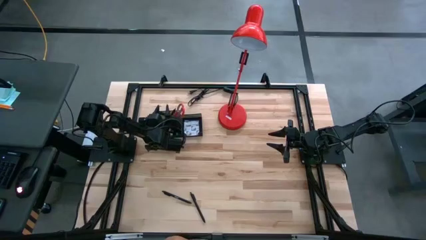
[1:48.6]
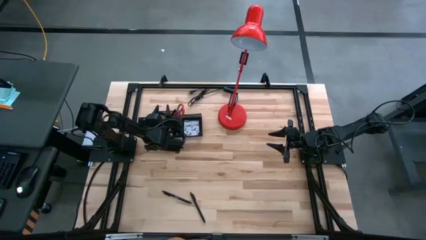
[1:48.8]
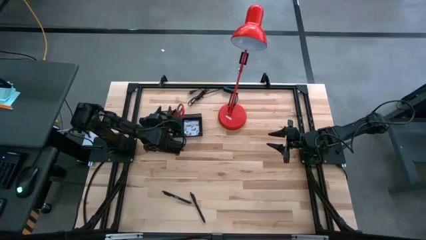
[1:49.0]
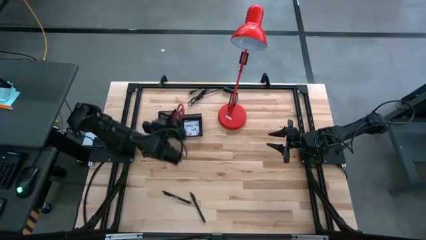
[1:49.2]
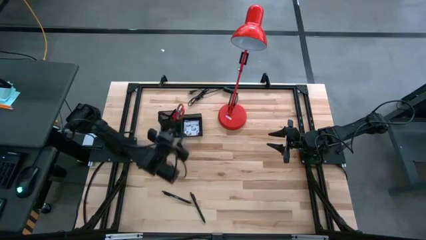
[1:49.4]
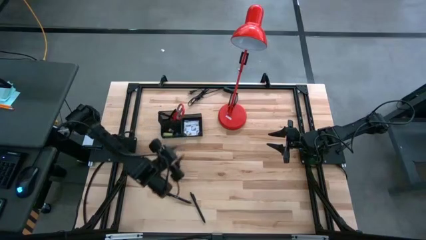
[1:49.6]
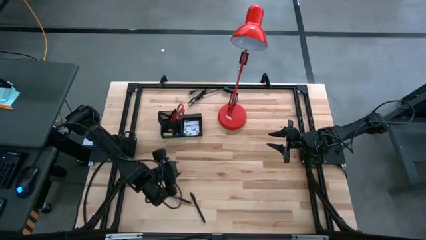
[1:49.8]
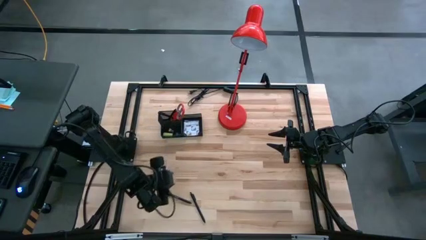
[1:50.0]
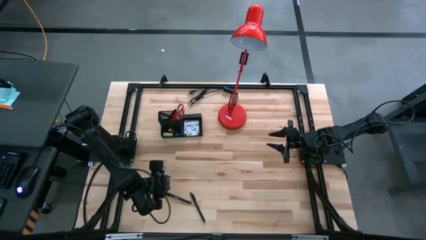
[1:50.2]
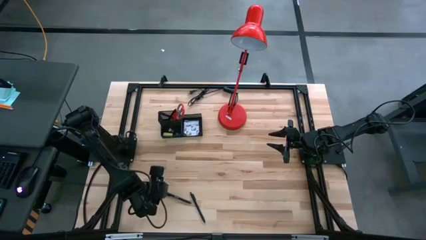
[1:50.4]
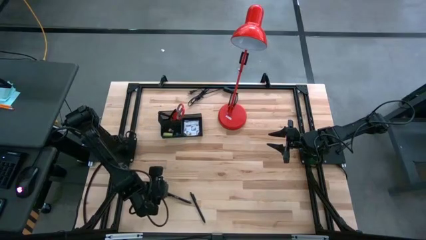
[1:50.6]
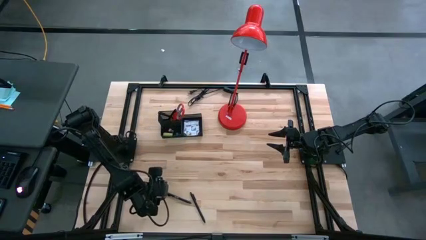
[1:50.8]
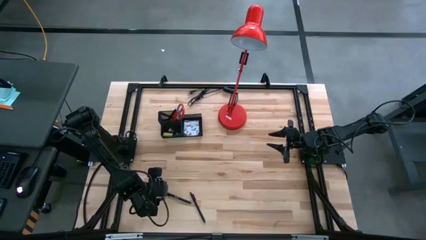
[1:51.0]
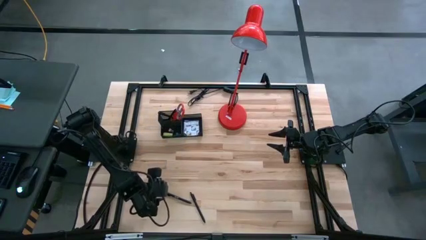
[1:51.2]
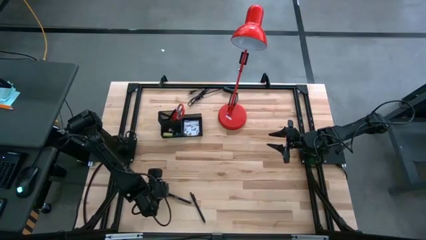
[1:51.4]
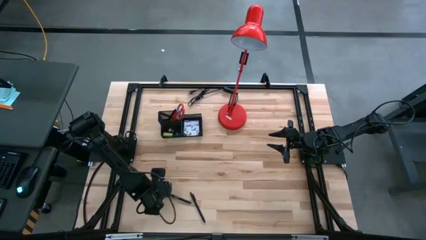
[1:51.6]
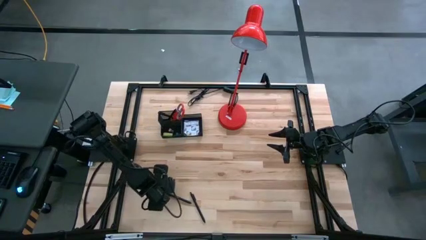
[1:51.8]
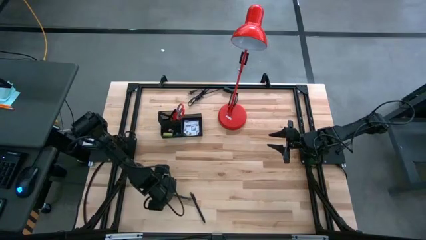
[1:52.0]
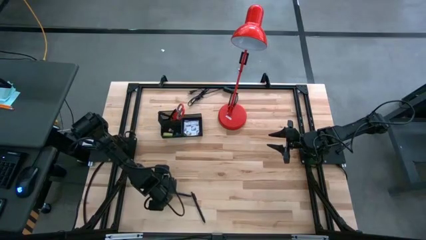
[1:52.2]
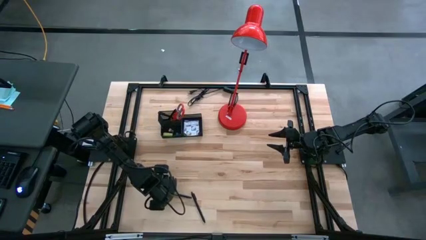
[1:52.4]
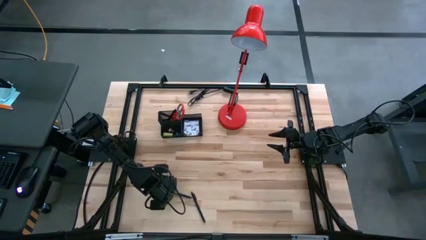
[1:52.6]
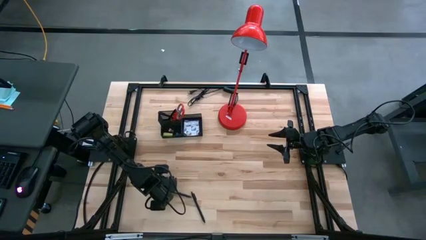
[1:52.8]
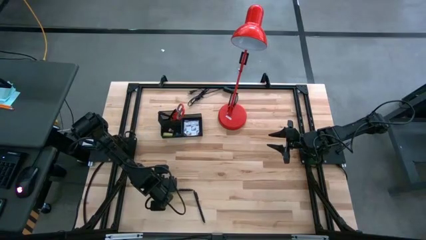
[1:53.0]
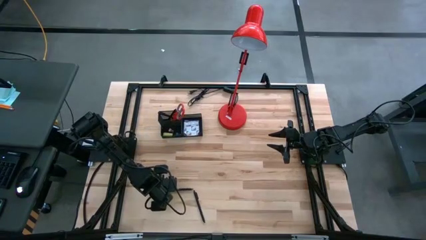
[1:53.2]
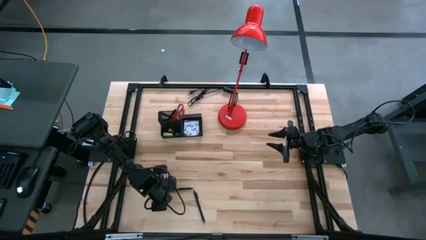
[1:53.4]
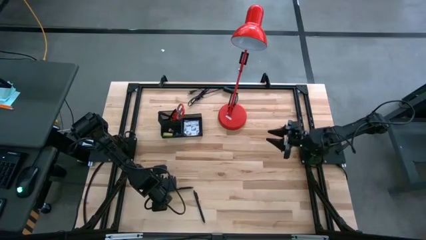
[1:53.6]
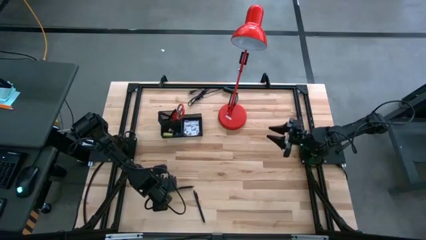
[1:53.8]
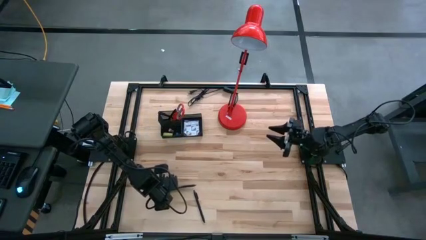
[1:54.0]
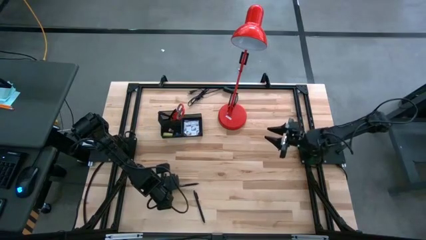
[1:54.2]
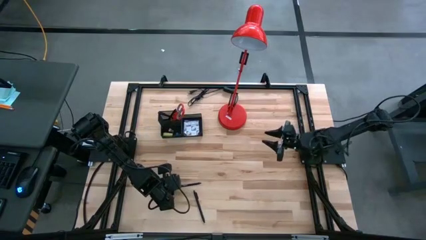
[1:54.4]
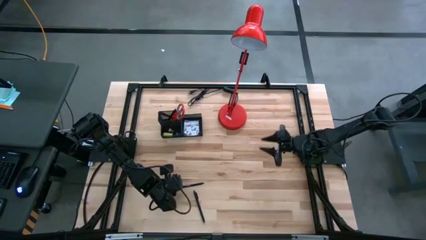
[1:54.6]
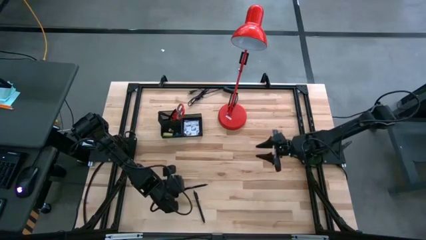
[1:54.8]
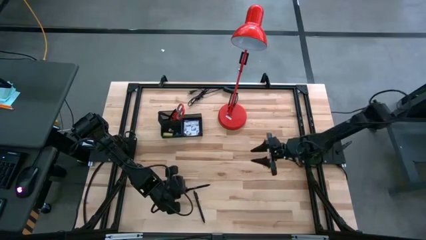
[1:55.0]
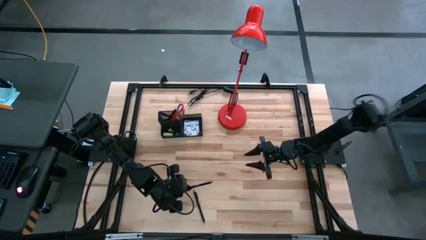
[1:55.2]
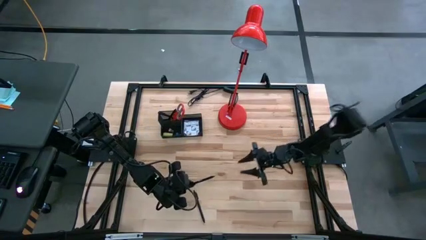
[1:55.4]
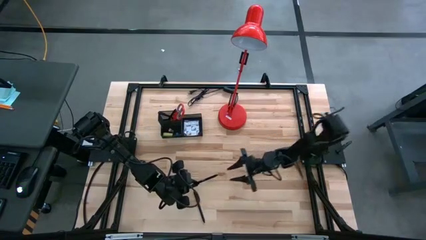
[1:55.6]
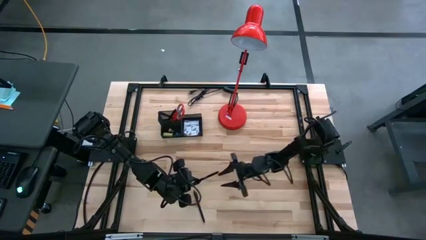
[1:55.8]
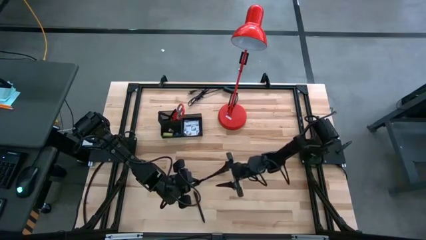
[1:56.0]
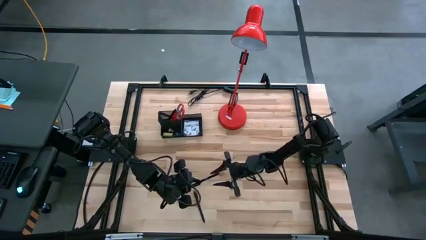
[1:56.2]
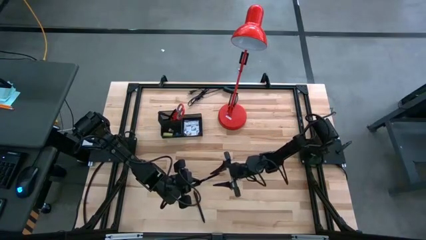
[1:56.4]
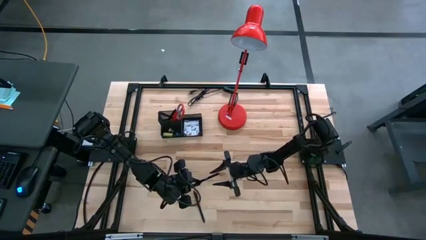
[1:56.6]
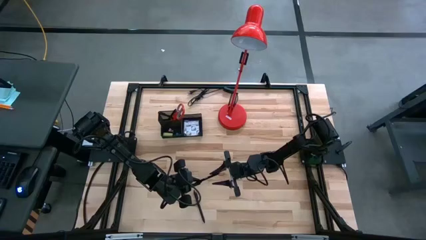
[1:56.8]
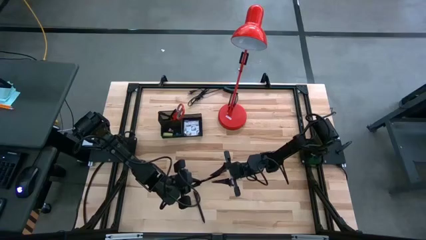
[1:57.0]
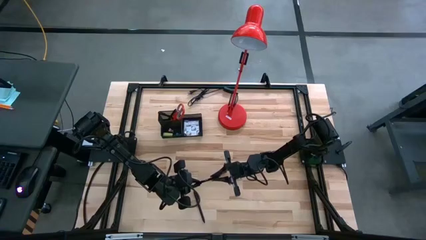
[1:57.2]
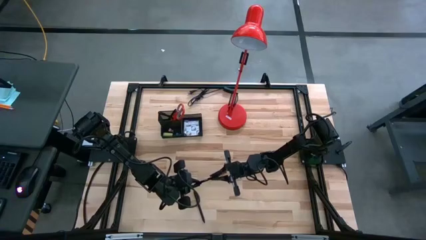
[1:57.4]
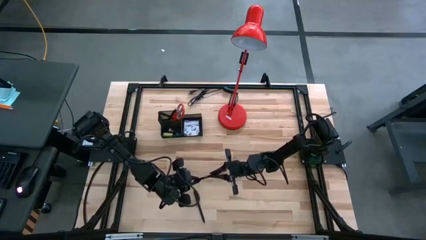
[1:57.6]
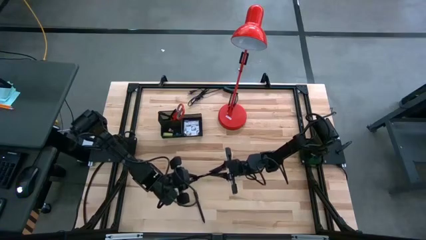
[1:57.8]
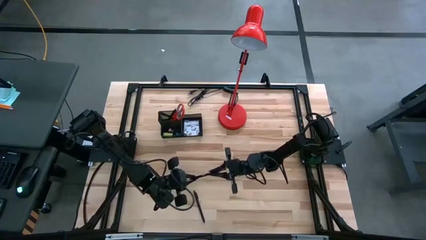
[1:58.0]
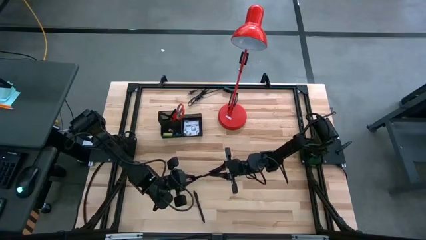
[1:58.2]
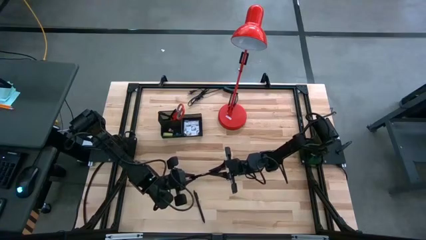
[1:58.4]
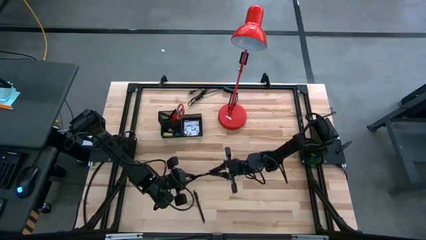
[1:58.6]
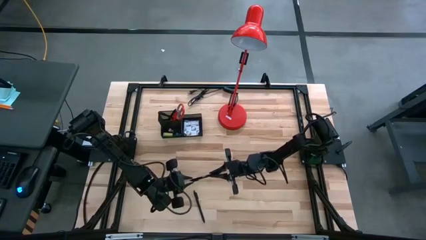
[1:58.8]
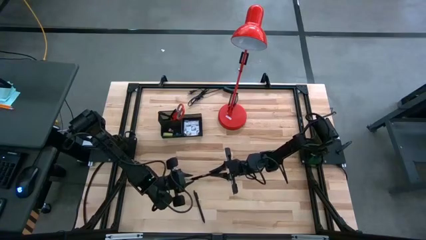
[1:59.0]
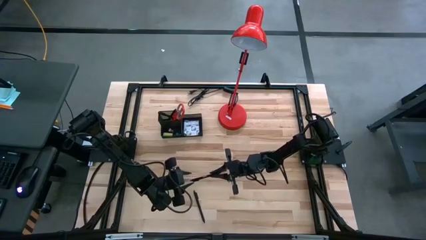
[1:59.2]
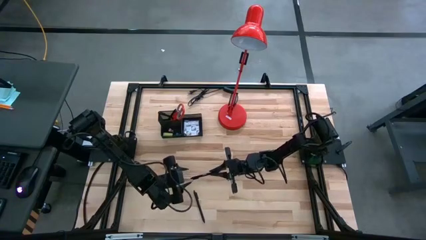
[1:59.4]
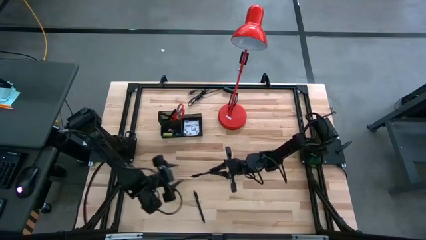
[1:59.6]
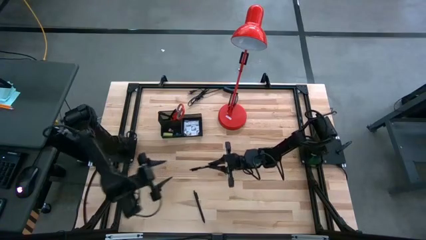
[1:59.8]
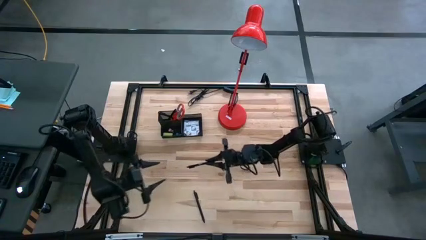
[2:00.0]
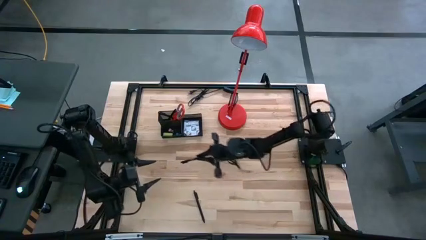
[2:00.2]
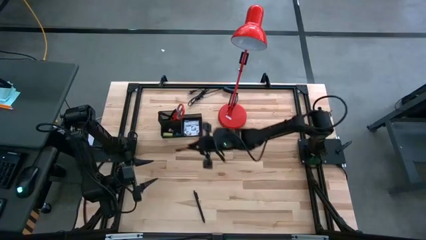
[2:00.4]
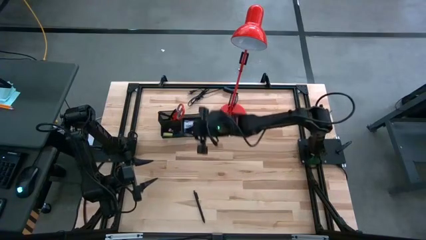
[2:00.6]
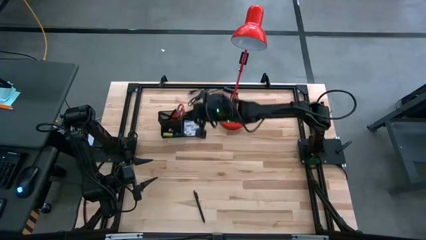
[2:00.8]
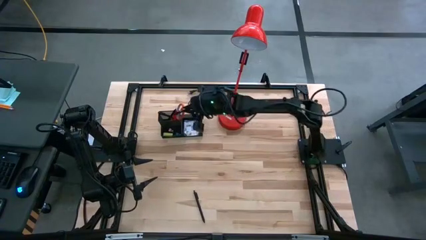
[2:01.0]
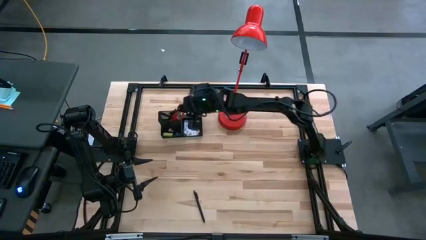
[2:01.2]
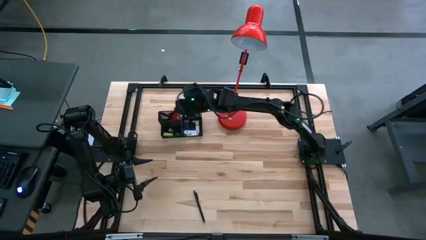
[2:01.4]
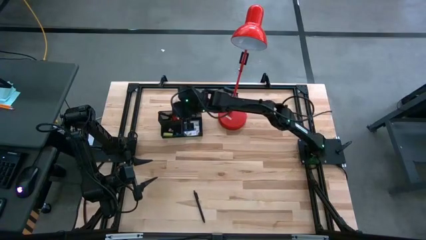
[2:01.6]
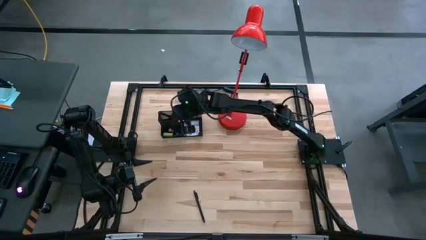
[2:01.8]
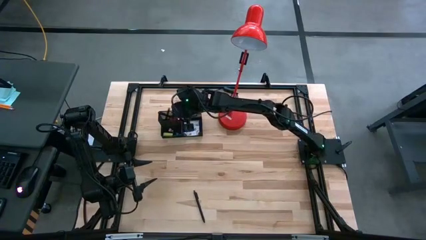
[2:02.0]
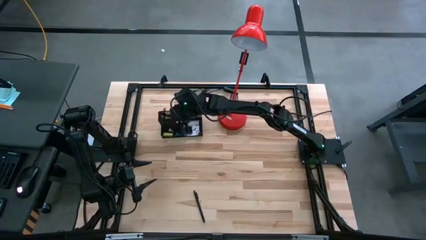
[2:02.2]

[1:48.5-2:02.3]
Task: Pick and place office supplies into organizer
Put the black pen into the black desk organizer
